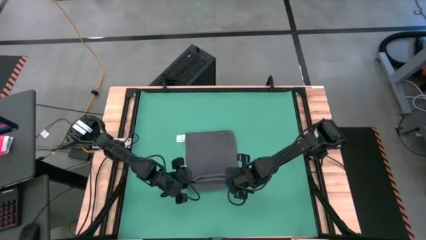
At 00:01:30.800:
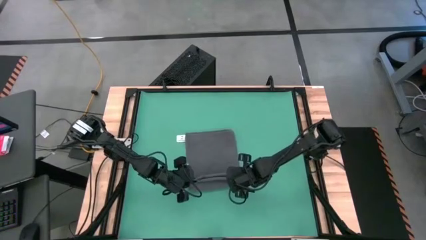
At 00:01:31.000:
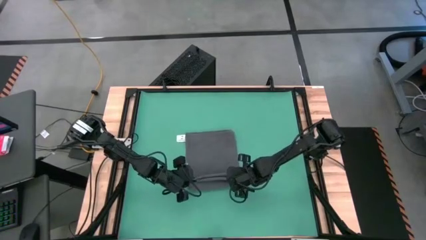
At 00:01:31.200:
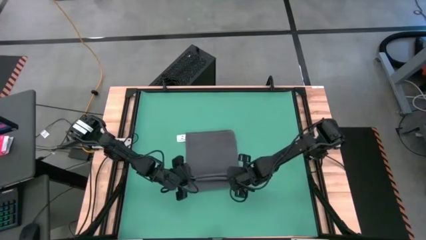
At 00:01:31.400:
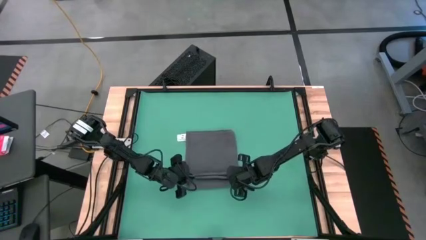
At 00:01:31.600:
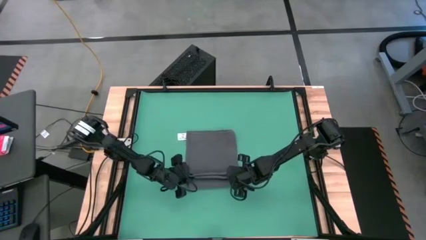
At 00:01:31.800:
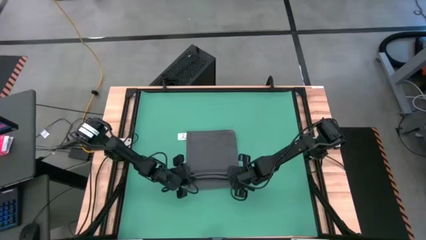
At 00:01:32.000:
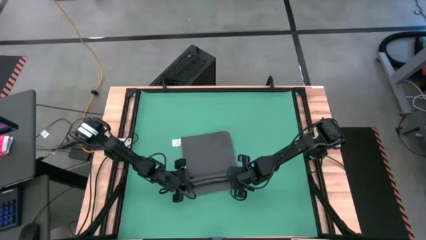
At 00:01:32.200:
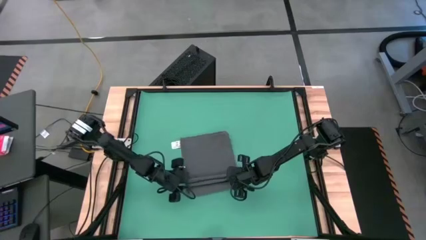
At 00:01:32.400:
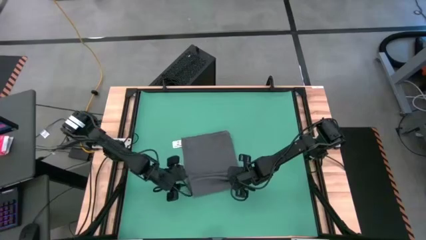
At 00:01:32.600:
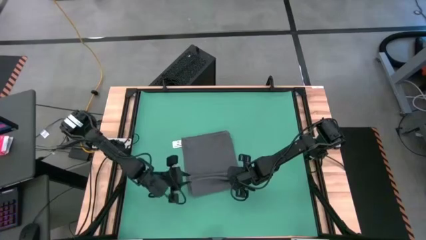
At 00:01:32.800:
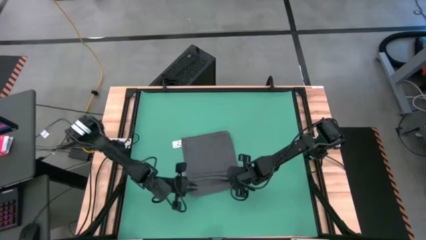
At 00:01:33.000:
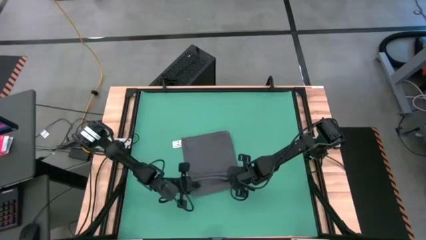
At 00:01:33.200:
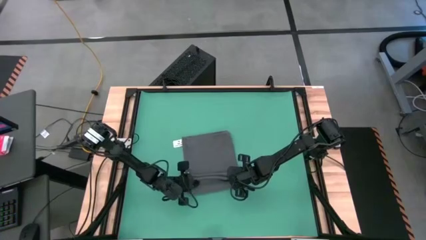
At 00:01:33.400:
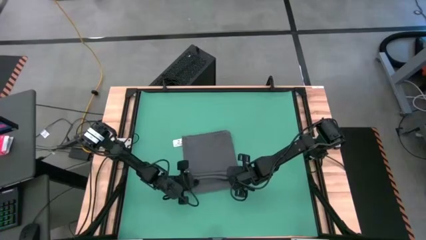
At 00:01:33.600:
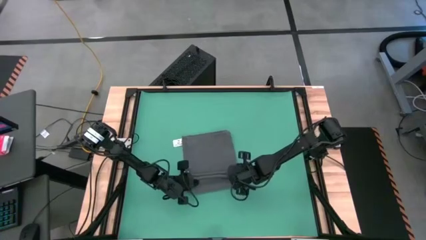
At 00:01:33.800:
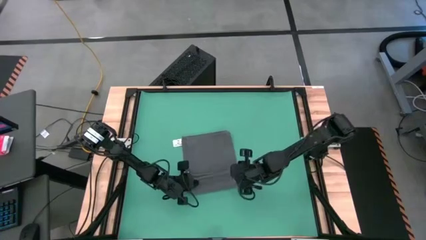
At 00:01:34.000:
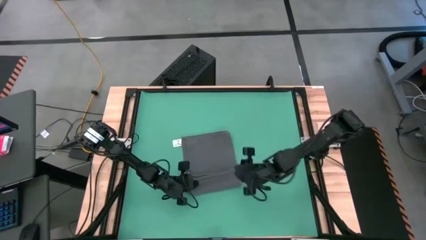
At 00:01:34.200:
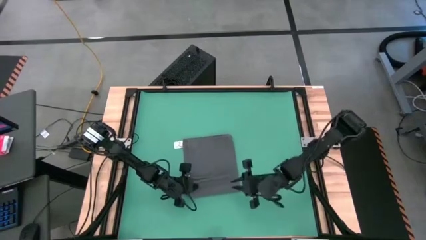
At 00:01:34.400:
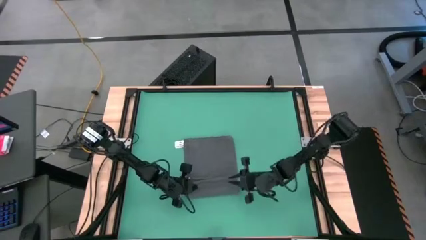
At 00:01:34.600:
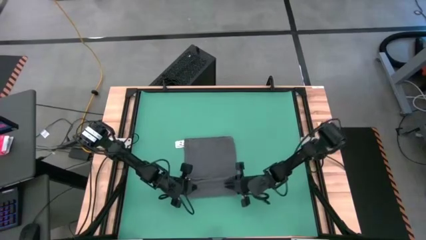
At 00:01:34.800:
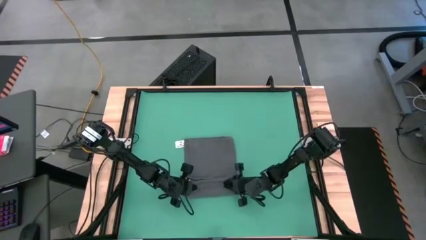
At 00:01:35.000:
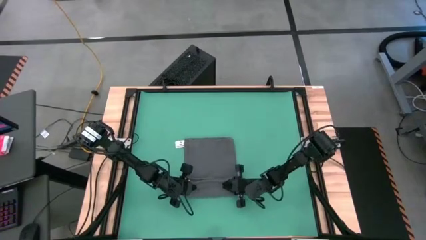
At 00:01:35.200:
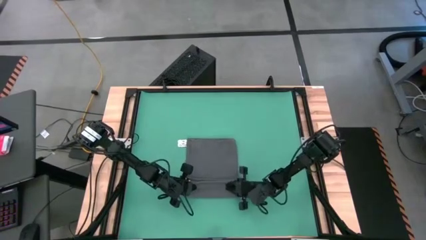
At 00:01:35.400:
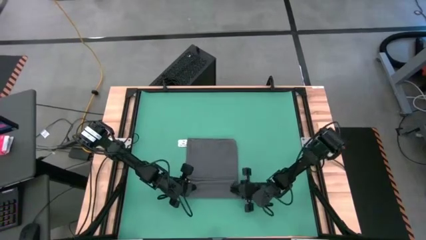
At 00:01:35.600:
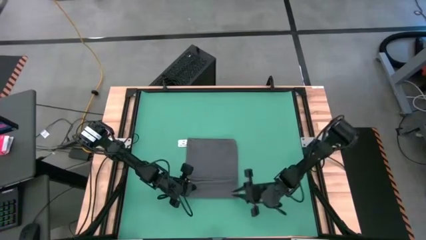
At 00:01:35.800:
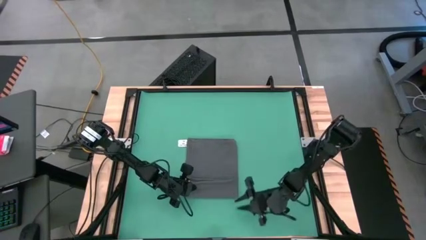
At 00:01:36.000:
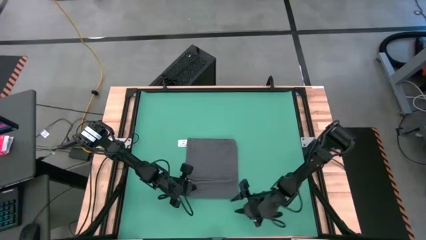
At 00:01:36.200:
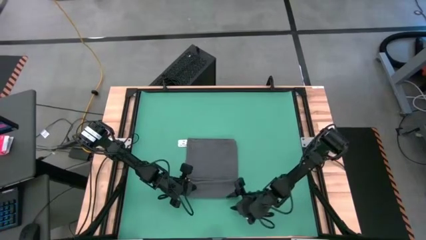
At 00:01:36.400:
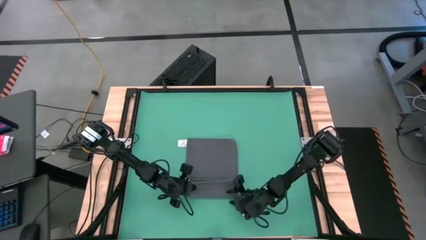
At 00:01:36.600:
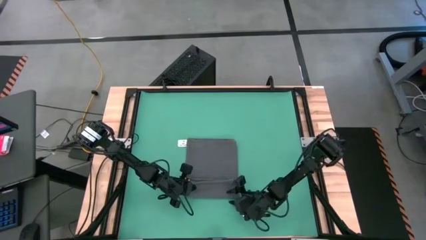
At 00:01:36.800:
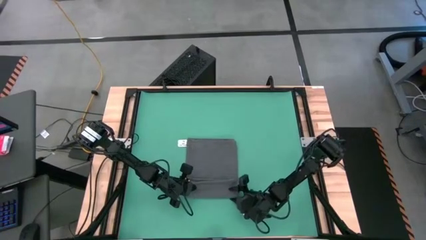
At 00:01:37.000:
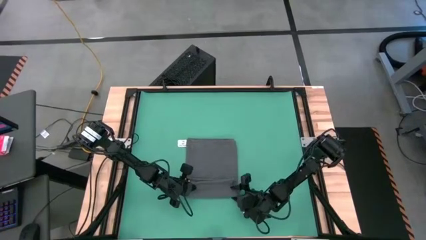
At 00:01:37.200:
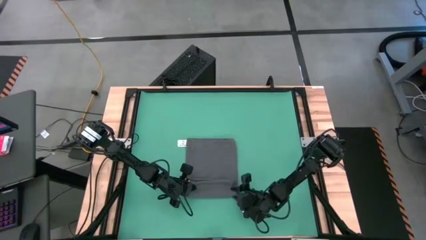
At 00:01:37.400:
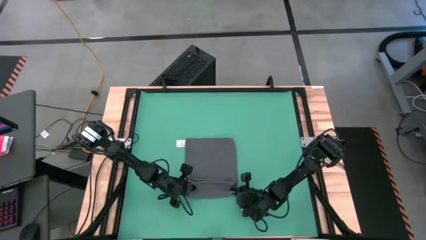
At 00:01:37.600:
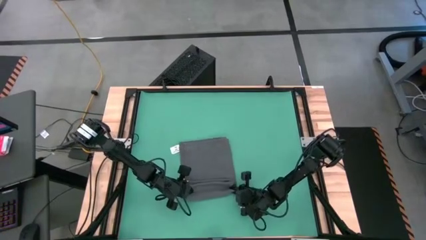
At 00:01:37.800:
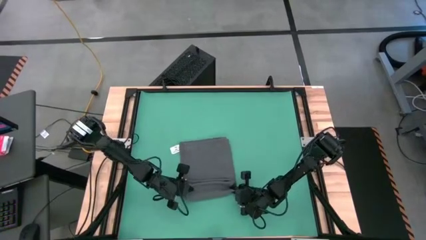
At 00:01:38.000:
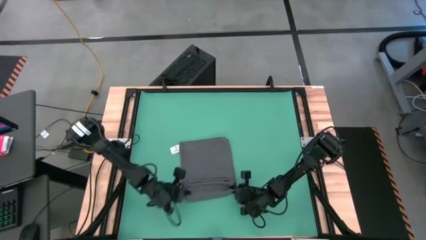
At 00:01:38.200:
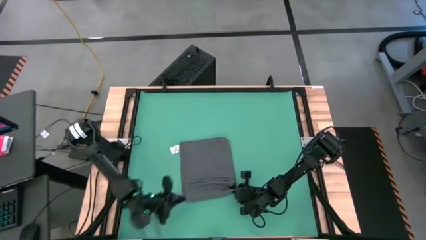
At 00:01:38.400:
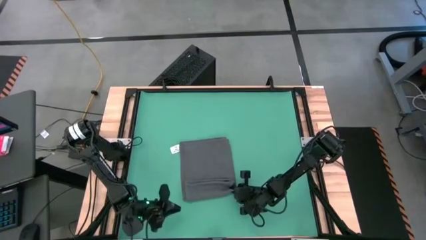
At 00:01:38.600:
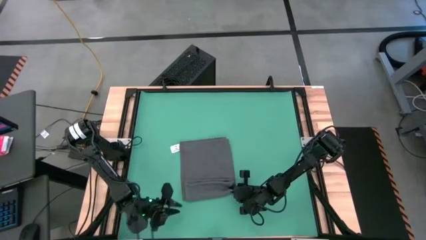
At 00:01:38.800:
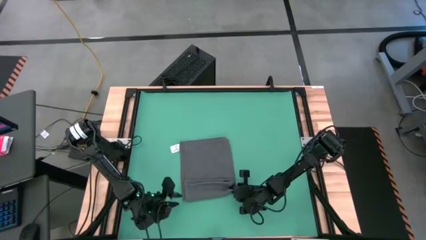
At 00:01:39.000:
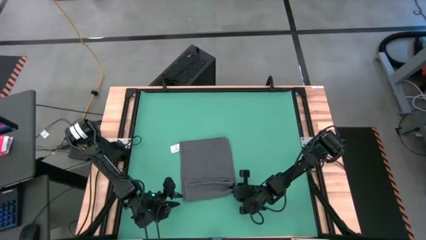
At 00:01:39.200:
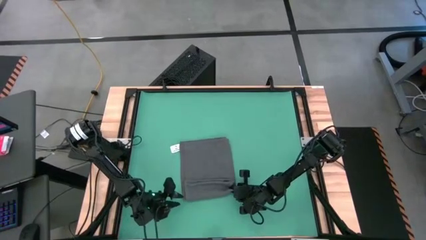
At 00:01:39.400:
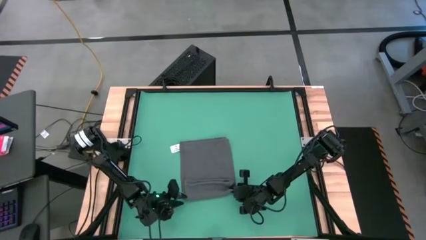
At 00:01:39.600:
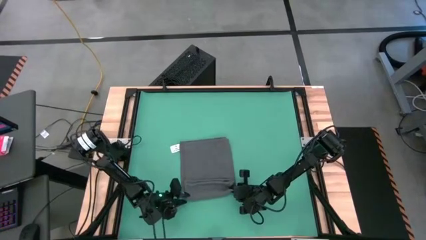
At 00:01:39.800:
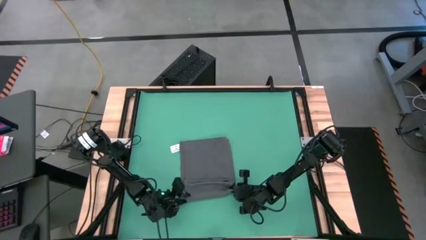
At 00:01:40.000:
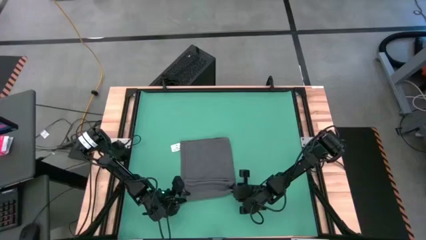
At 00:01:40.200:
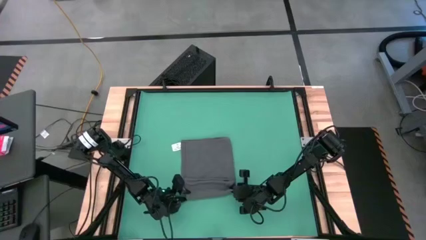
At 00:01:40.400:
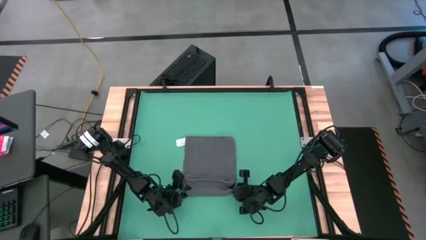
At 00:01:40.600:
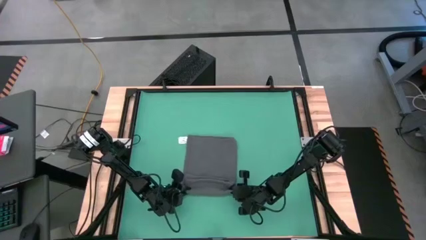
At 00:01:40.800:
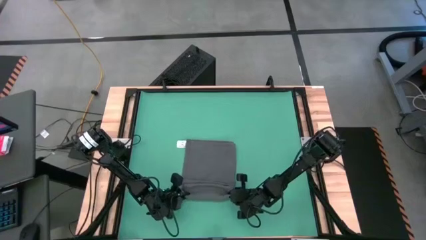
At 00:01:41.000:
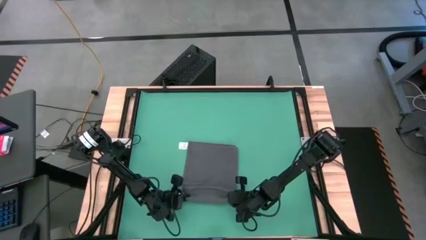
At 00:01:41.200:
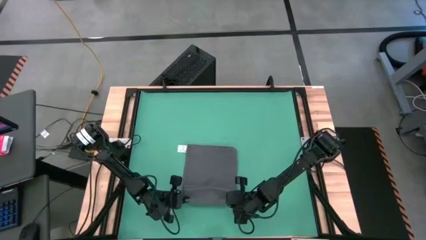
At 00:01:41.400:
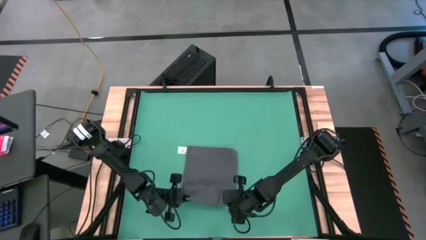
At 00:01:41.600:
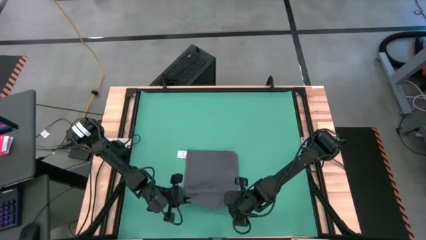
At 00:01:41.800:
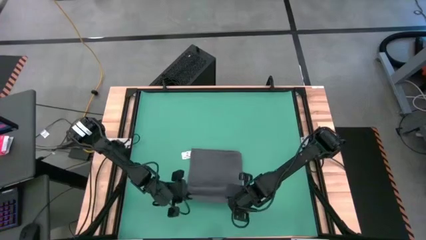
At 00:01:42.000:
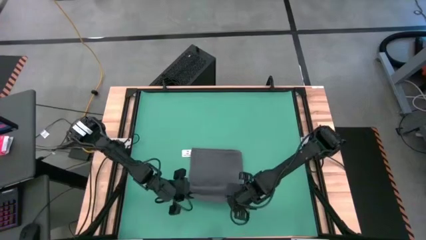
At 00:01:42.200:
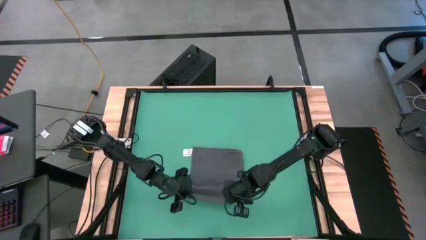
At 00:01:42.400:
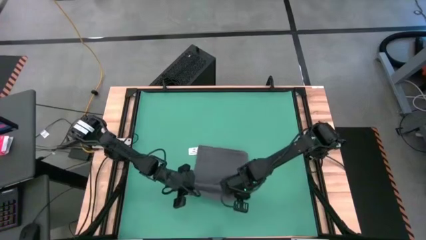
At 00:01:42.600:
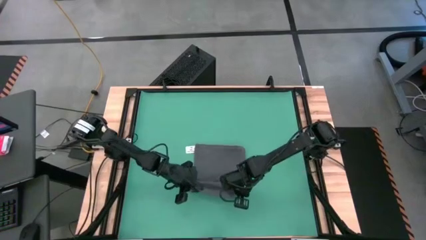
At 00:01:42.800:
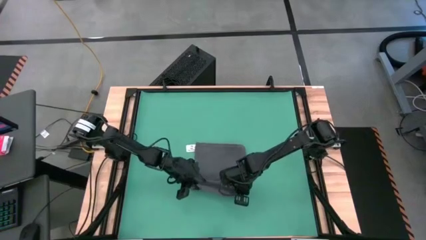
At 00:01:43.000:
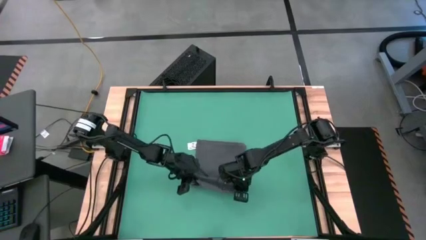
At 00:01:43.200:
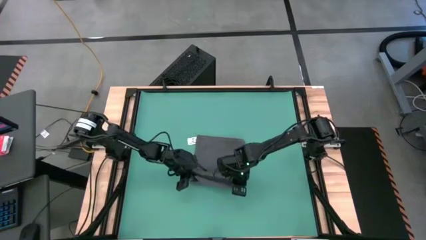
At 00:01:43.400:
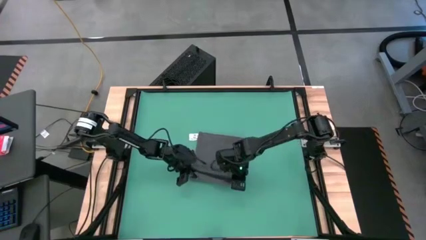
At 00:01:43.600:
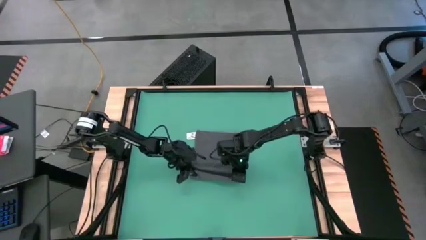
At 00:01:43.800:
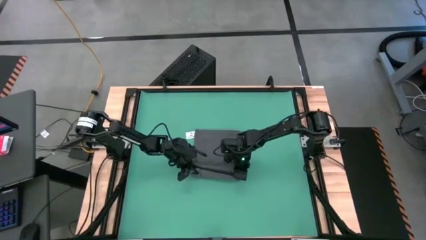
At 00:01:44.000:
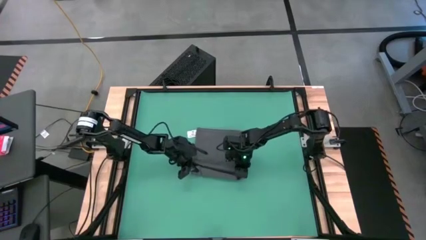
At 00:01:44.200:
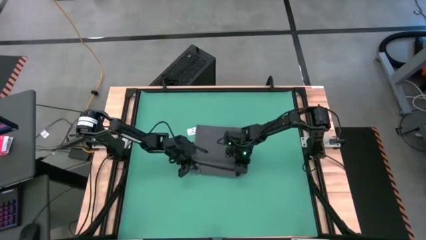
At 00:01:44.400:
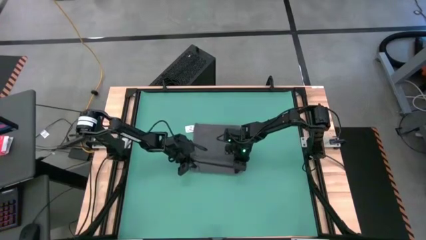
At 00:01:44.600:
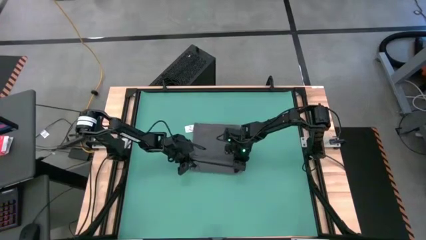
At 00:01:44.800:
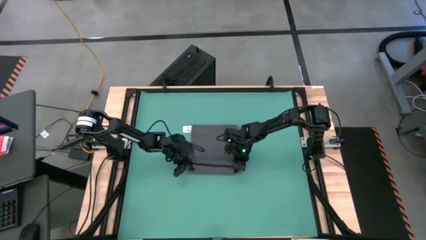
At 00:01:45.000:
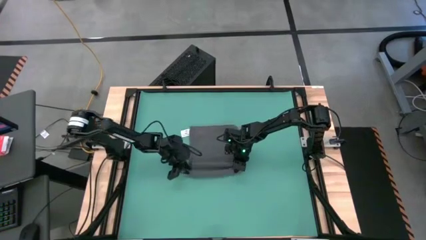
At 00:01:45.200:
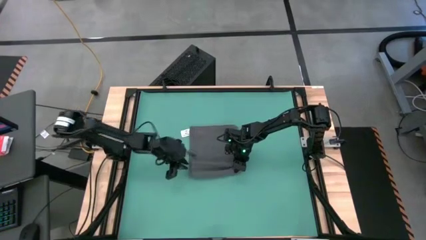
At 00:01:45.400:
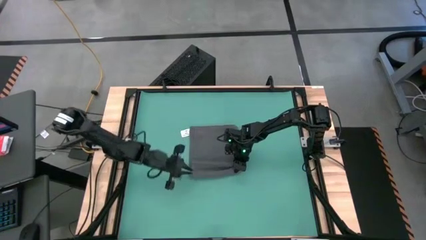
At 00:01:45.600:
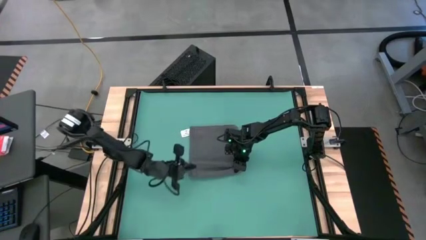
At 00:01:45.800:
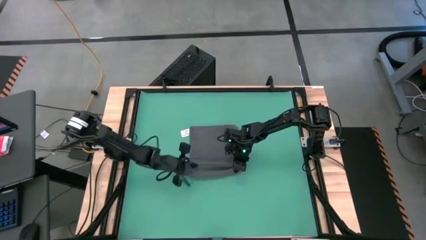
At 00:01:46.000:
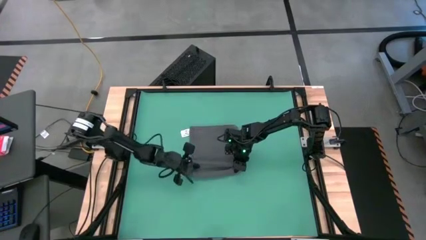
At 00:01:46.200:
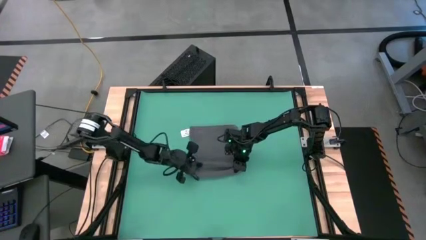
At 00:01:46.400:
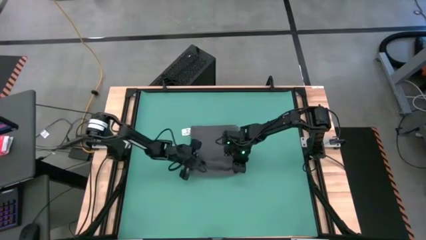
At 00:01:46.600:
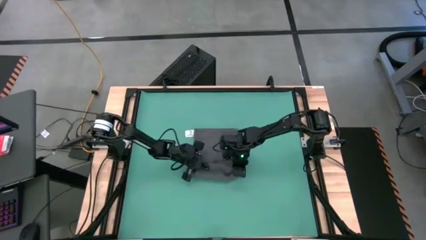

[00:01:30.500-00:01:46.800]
Task: Roll towel
Roll the gray towel
